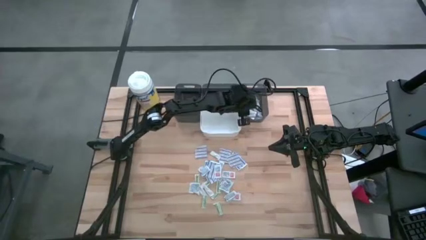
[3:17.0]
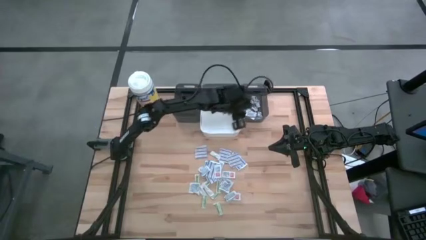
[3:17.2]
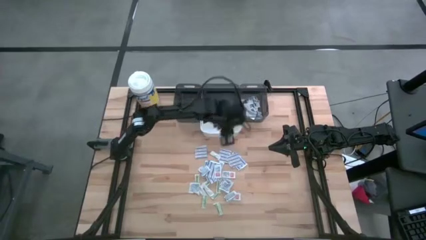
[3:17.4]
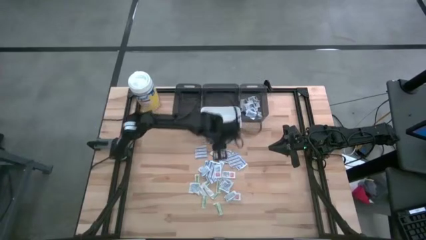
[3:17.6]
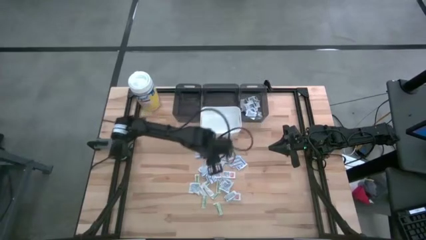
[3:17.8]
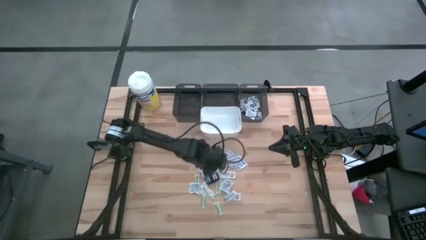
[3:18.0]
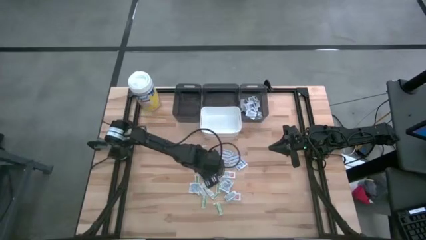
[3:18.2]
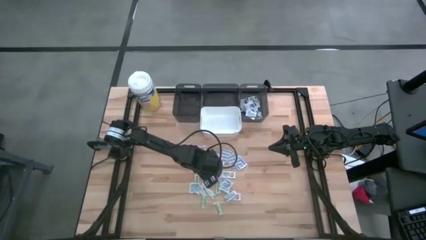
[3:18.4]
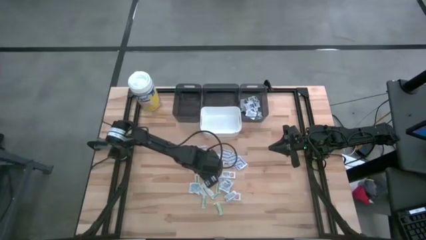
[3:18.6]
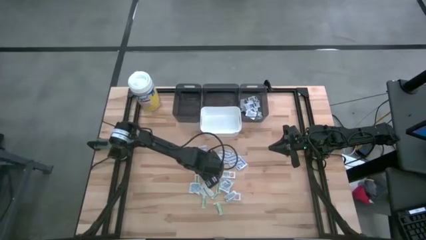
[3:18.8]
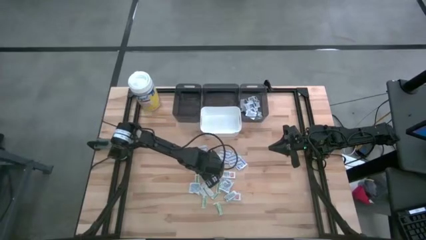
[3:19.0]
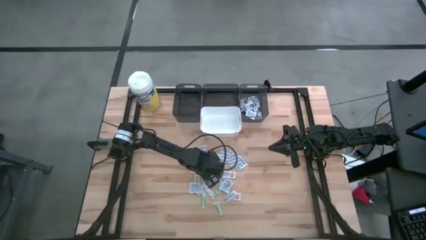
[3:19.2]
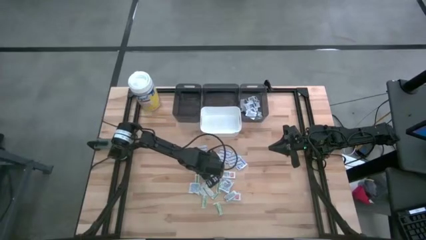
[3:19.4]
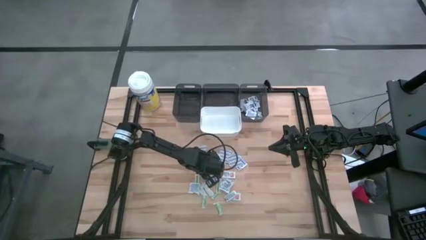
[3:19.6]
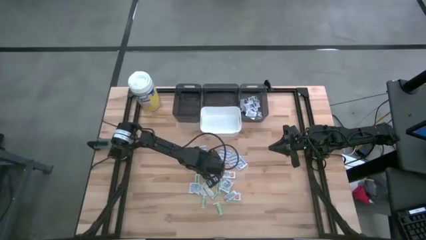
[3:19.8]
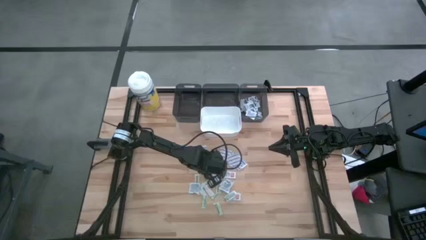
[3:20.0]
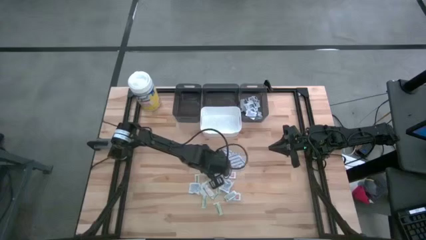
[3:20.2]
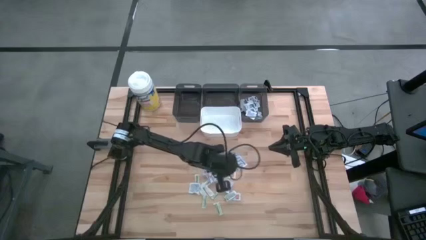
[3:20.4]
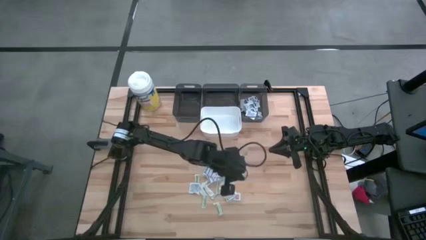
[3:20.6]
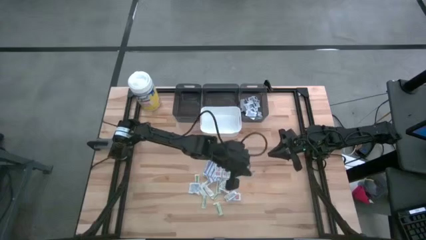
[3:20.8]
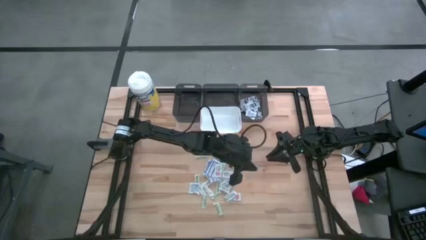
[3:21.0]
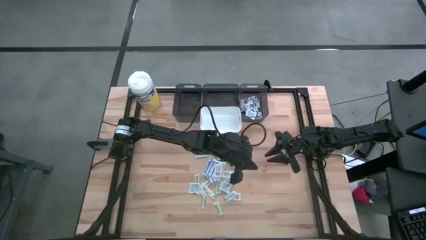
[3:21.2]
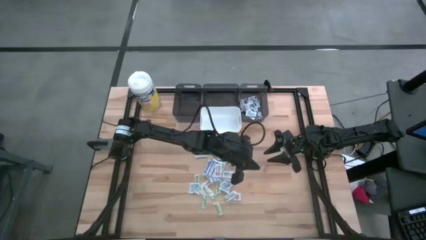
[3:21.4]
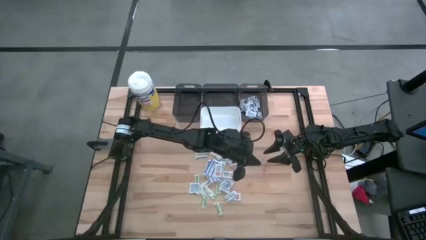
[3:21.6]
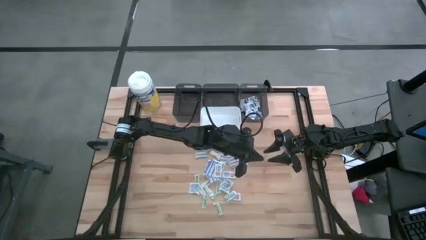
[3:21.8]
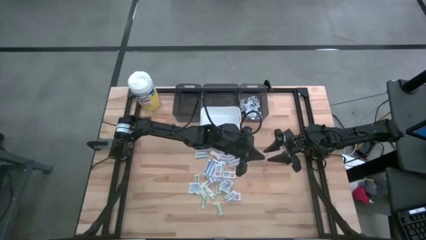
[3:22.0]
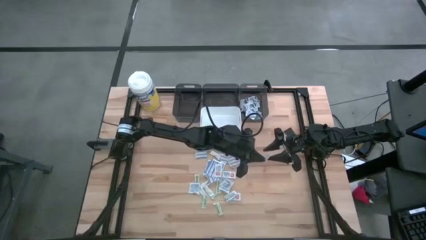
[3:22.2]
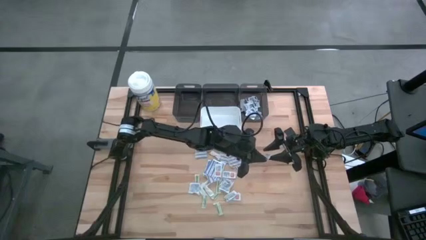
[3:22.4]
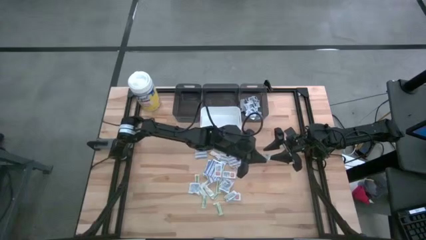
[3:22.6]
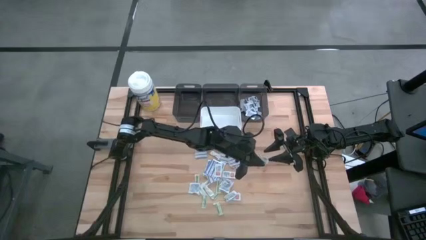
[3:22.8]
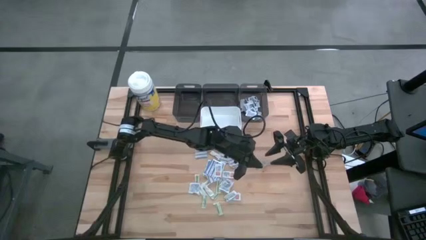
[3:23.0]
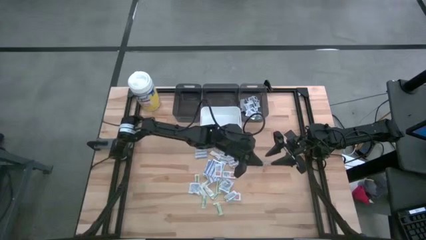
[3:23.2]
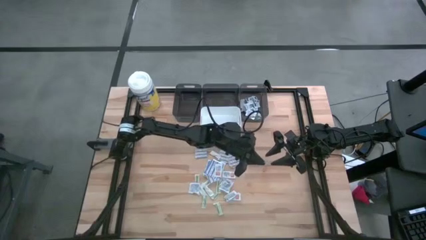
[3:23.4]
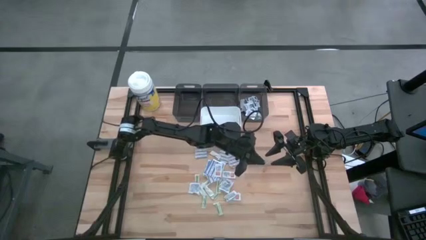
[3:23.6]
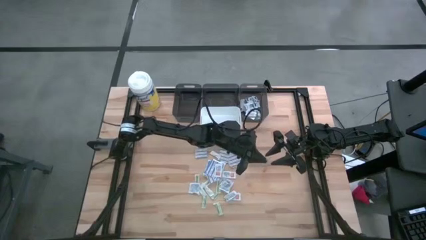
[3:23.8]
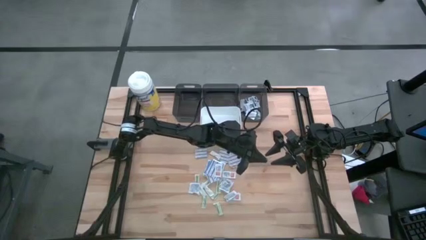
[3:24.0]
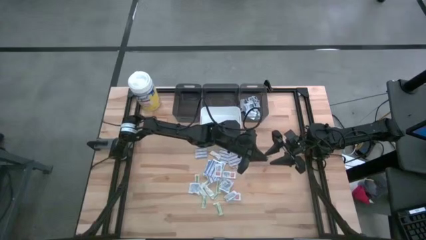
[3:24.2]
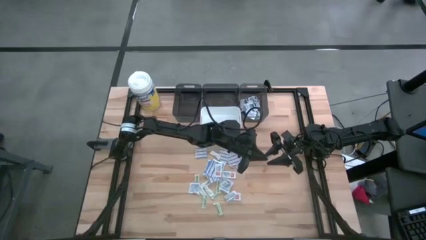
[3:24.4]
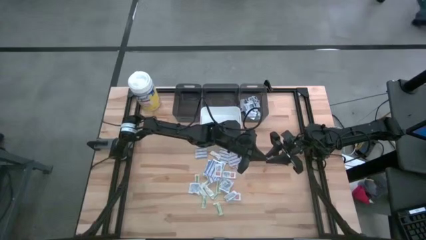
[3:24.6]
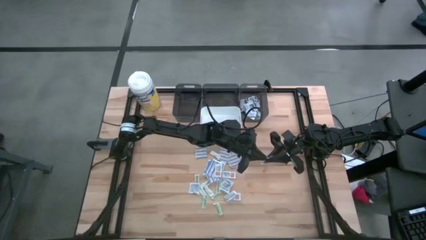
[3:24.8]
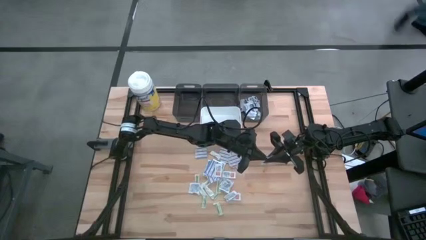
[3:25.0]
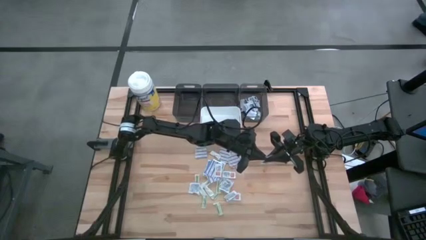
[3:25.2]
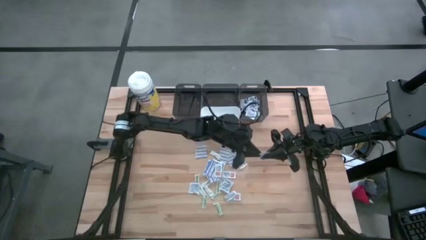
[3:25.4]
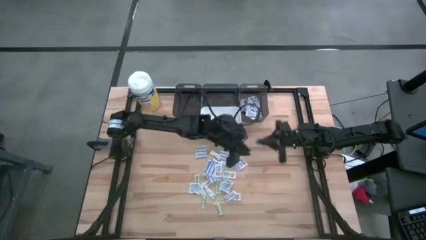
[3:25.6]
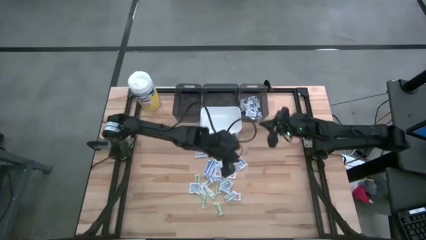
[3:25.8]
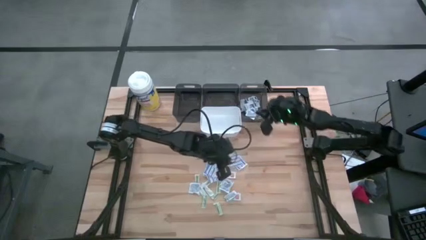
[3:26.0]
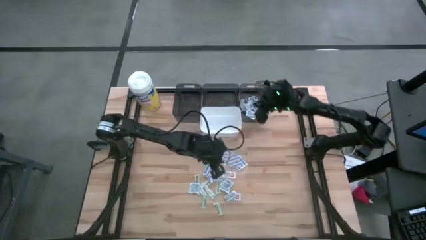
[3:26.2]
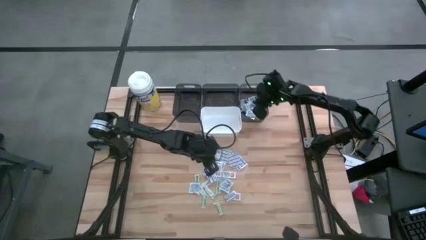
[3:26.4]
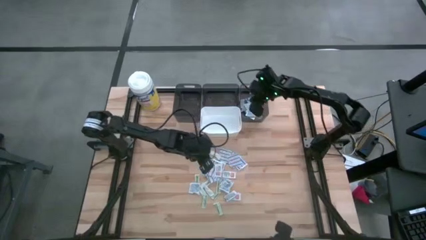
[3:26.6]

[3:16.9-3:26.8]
Task: Pick & Place First Aid Supplies
Put the blue alcohol pad into the right black bin

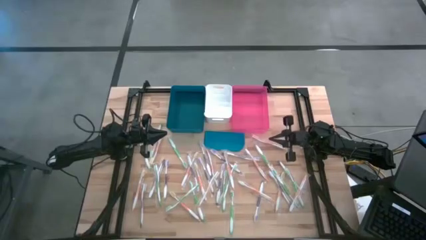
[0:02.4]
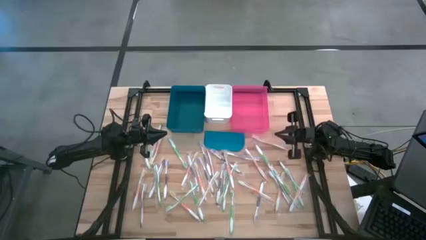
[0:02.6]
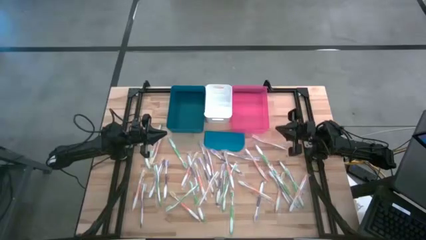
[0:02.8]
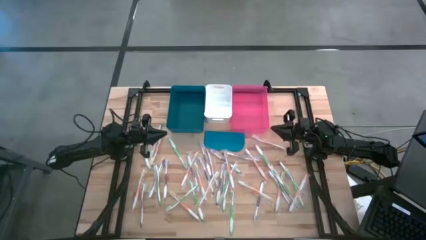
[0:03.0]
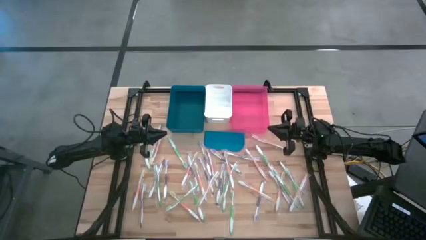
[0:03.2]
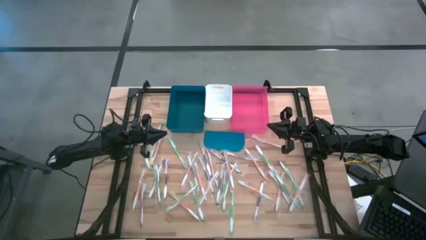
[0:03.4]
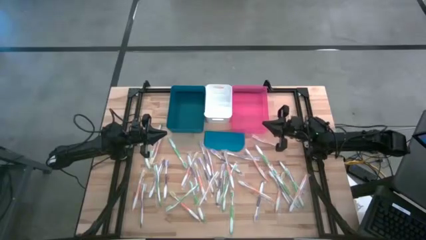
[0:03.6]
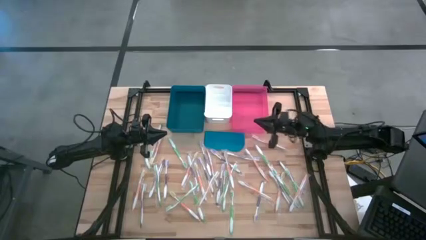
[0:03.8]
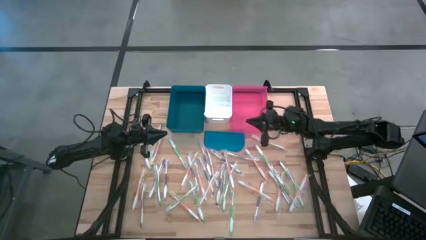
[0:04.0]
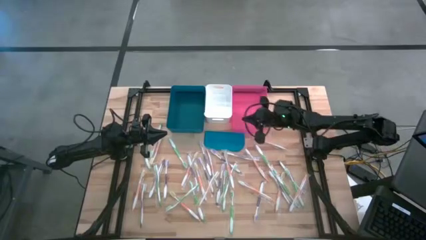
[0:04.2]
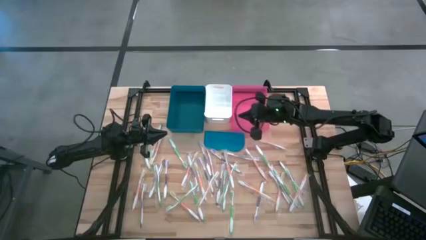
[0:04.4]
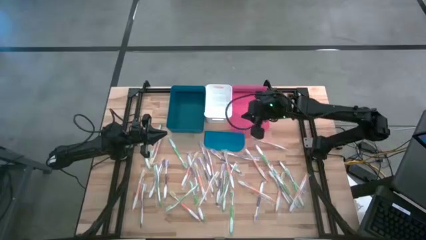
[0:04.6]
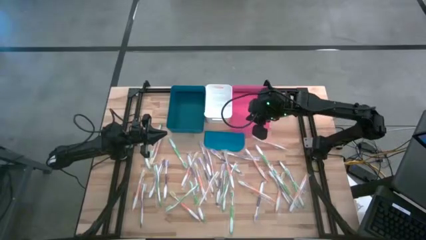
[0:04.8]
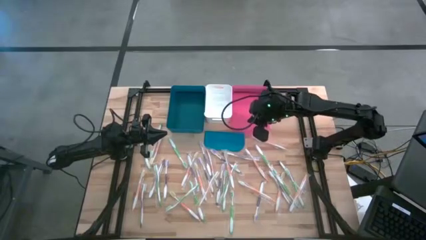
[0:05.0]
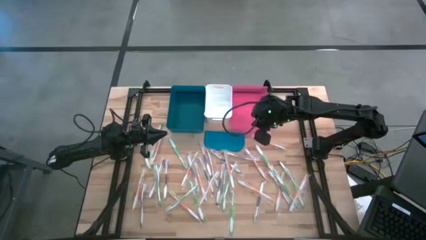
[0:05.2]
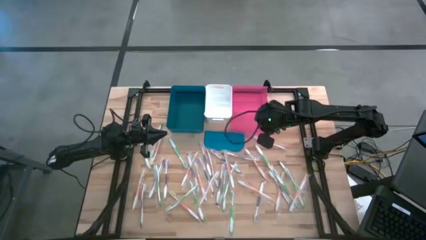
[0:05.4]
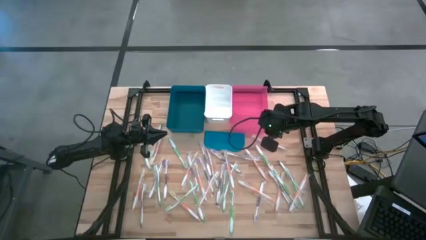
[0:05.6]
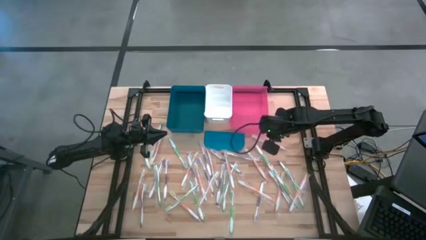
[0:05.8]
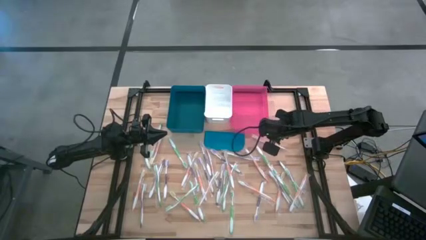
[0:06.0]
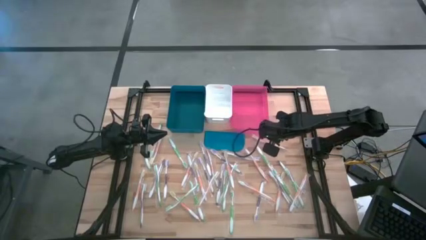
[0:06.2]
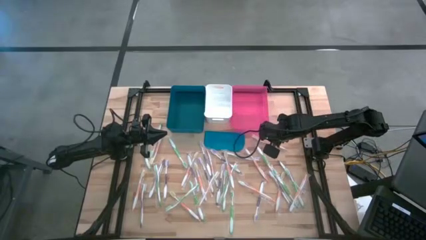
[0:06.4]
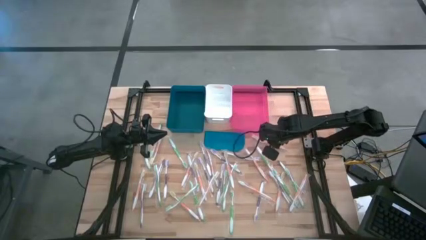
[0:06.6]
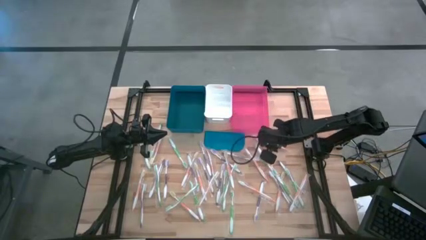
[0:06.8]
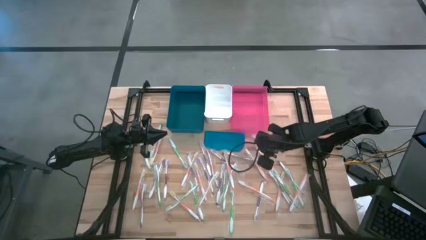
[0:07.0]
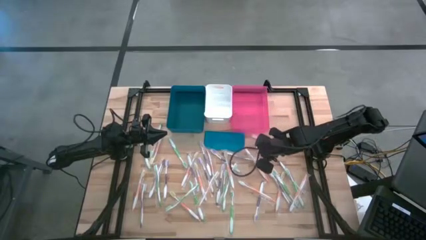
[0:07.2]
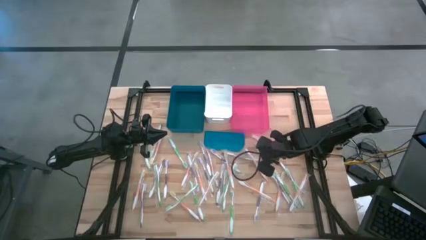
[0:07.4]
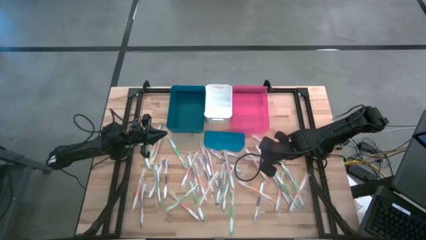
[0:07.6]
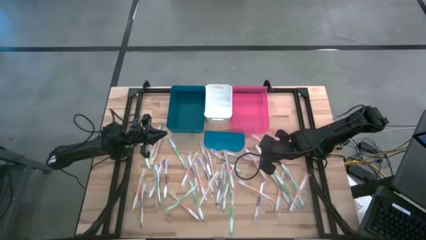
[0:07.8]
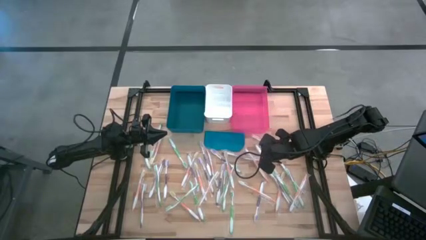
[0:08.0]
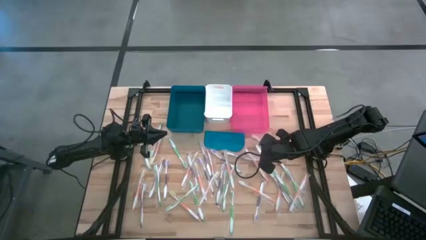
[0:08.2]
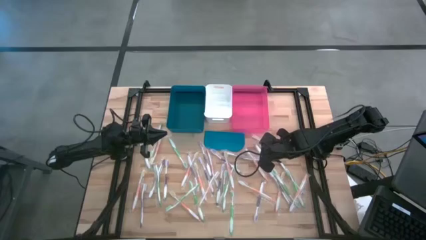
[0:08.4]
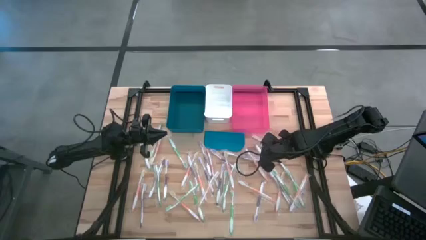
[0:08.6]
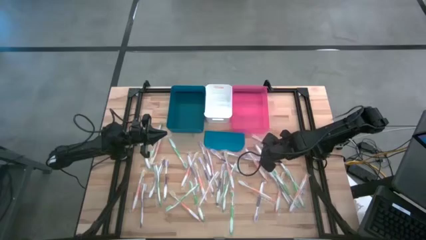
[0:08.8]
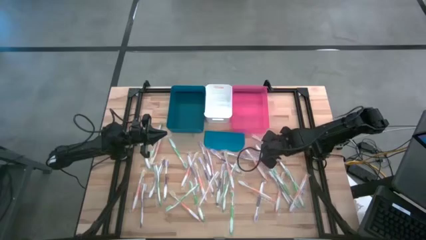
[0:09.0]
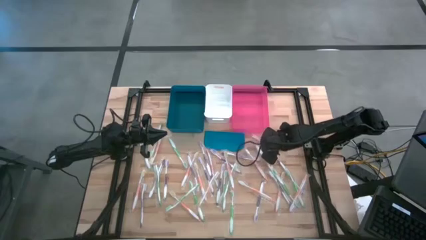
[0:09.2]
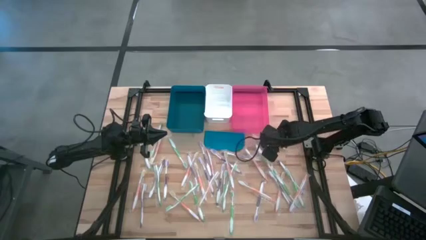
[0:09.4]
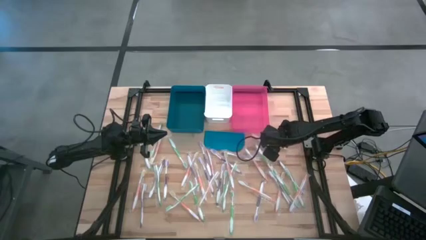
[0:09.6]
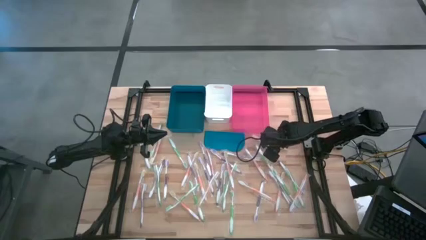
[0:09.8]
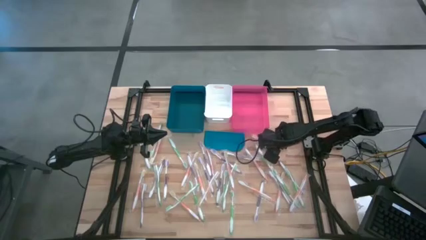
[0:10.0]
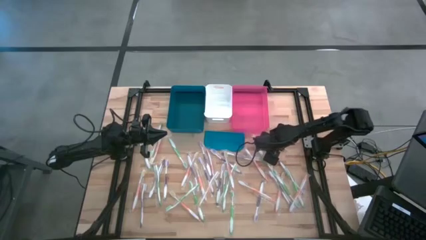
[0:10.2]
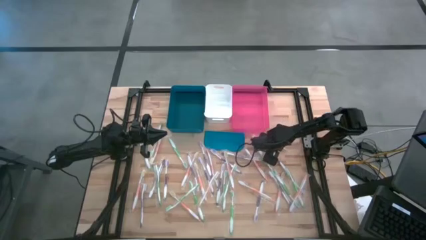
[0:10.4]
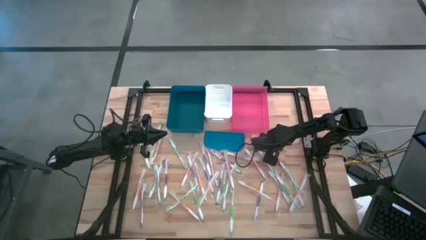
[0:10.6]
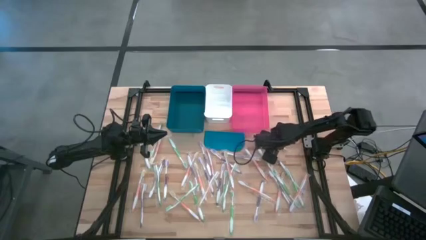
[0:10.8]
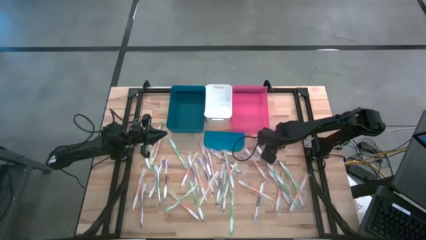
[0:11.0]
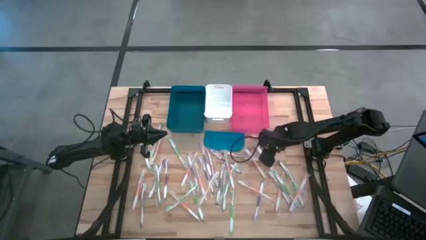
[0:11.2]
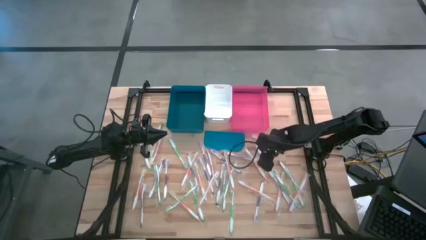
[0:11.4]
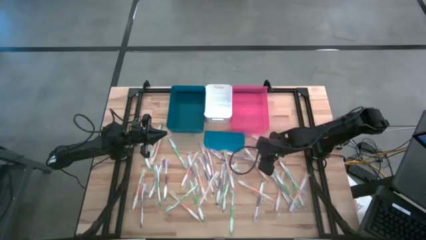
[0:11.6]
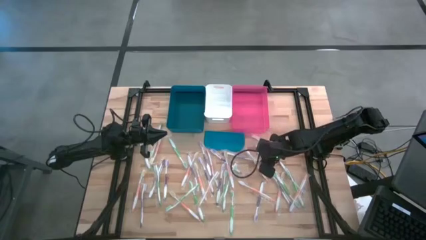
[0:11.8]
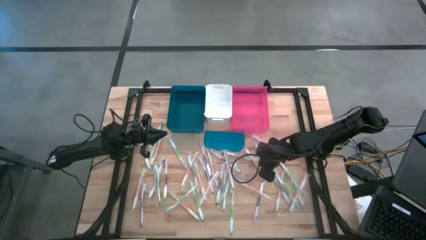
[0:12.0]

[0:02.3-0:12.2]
Task: Pick & Place Toothbrushes
Put the purple toothbrush into the pink bin
